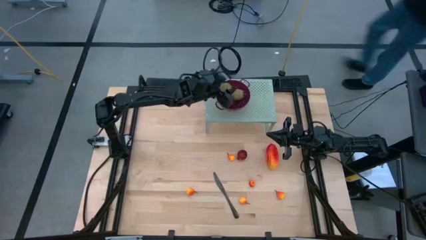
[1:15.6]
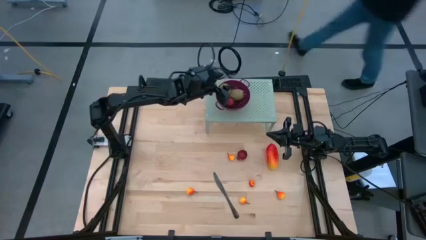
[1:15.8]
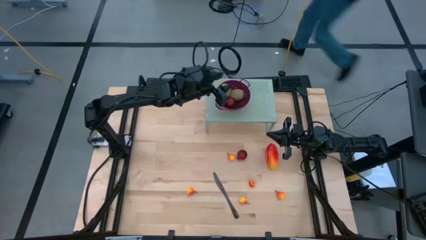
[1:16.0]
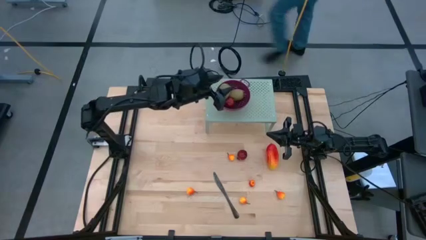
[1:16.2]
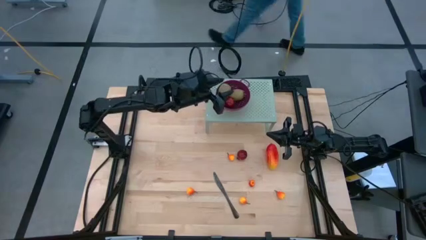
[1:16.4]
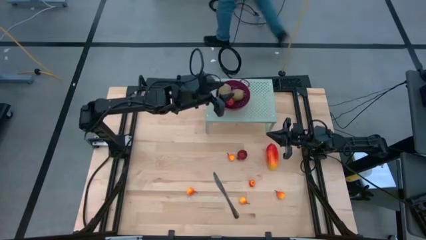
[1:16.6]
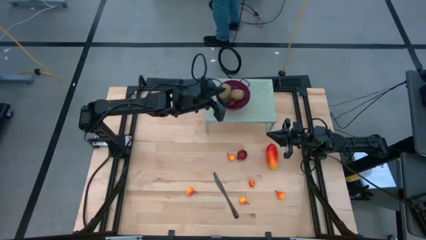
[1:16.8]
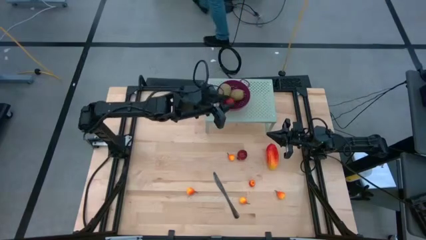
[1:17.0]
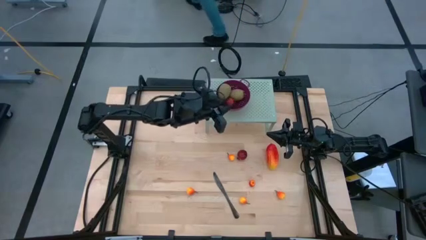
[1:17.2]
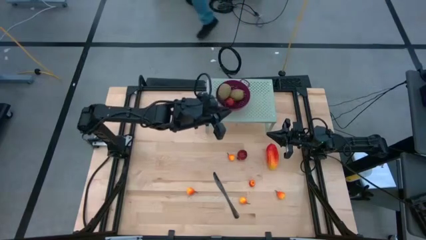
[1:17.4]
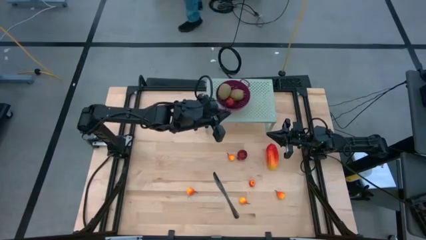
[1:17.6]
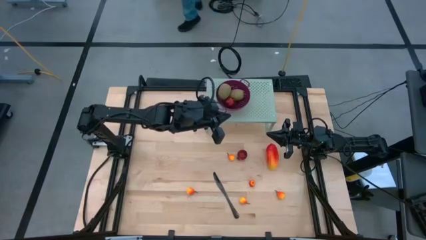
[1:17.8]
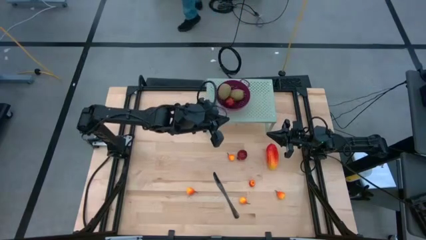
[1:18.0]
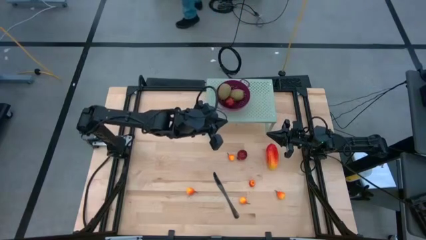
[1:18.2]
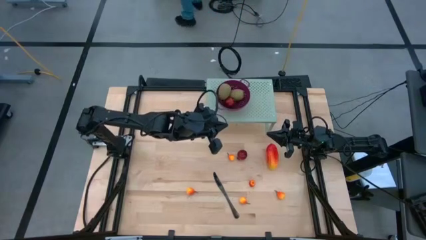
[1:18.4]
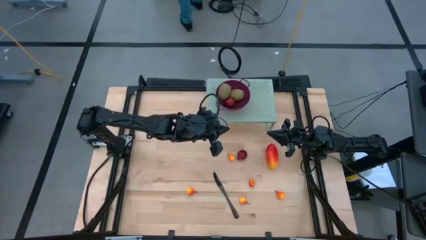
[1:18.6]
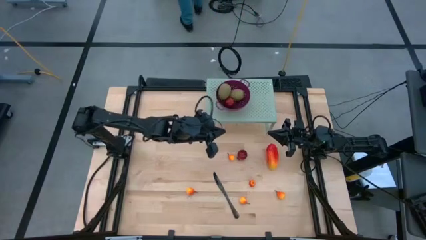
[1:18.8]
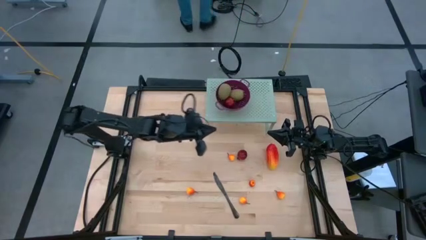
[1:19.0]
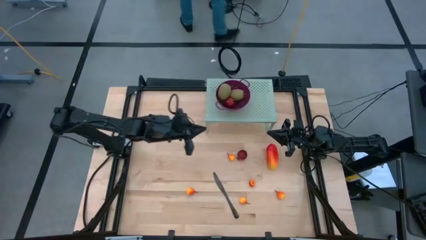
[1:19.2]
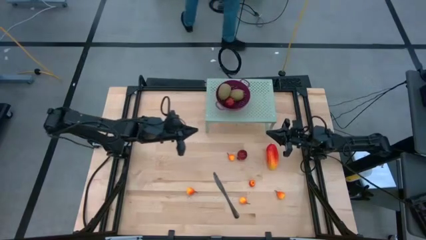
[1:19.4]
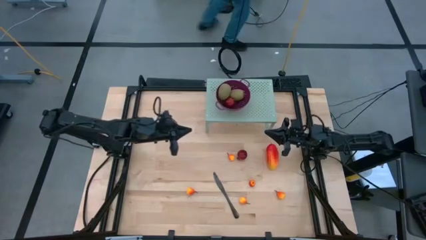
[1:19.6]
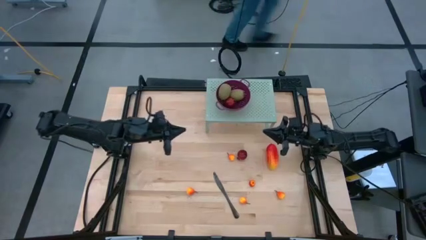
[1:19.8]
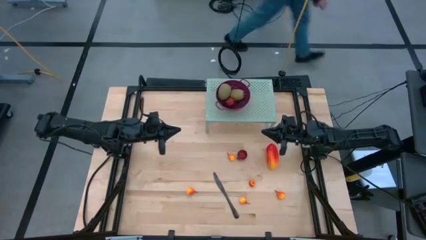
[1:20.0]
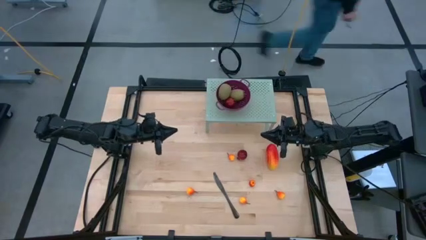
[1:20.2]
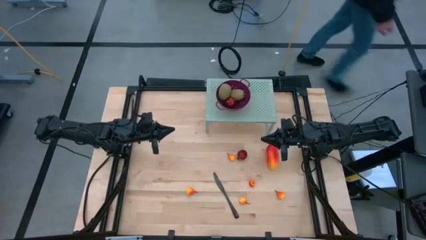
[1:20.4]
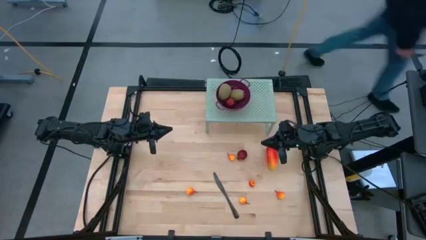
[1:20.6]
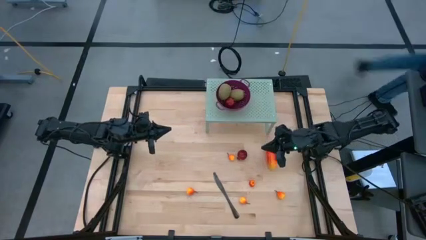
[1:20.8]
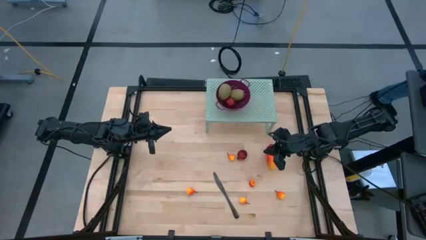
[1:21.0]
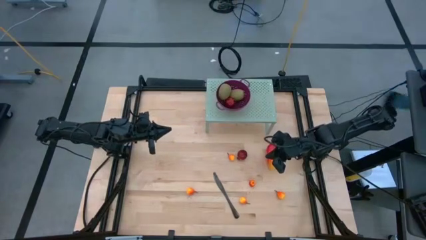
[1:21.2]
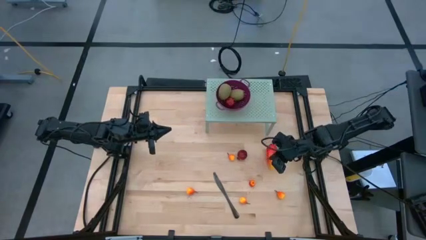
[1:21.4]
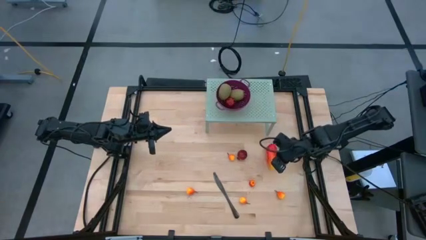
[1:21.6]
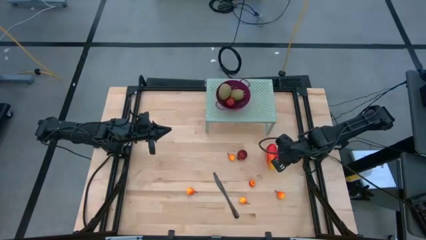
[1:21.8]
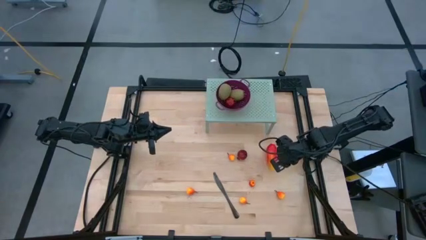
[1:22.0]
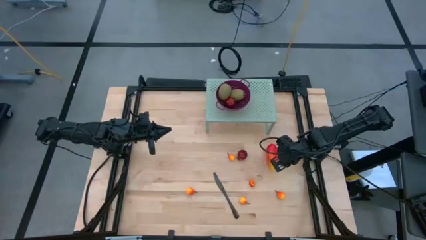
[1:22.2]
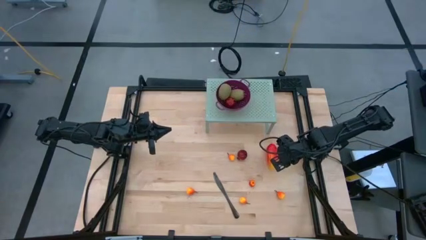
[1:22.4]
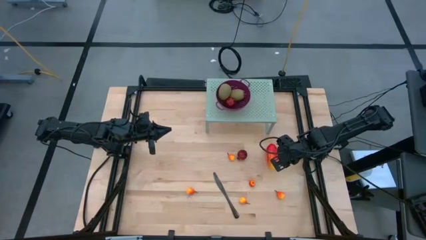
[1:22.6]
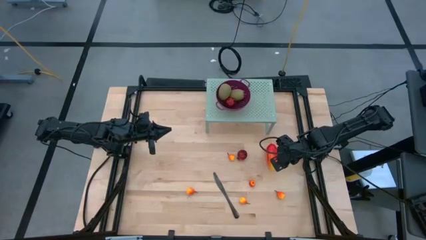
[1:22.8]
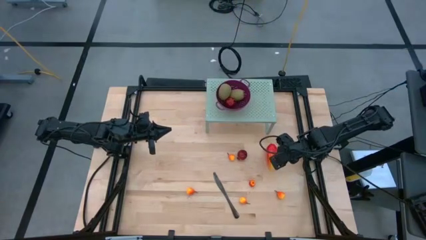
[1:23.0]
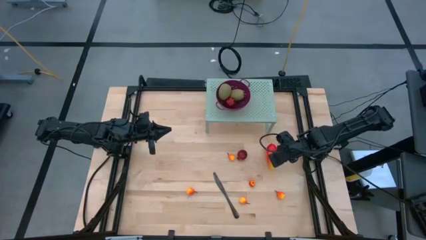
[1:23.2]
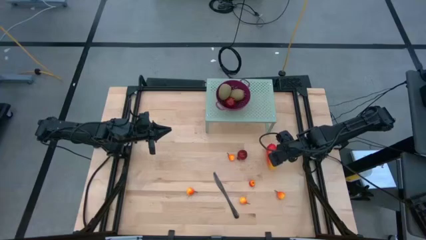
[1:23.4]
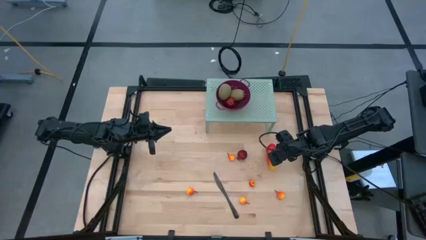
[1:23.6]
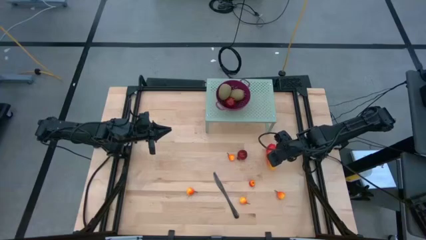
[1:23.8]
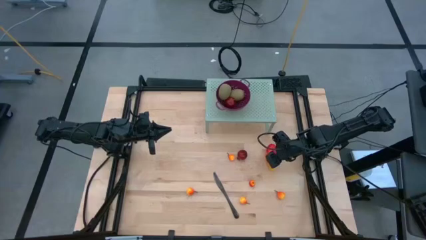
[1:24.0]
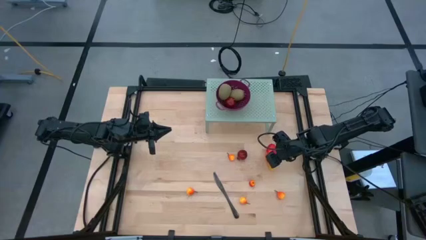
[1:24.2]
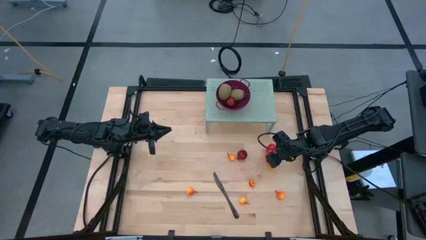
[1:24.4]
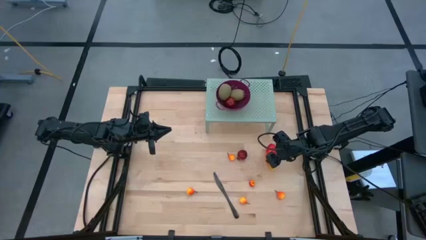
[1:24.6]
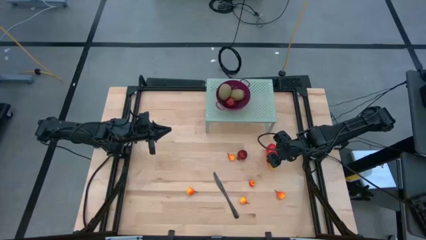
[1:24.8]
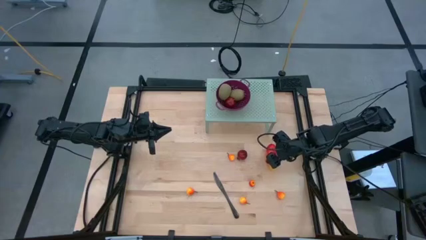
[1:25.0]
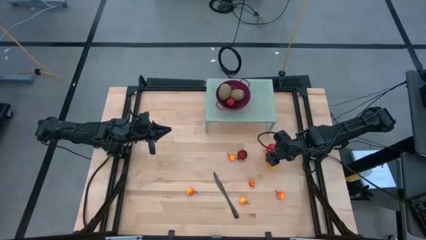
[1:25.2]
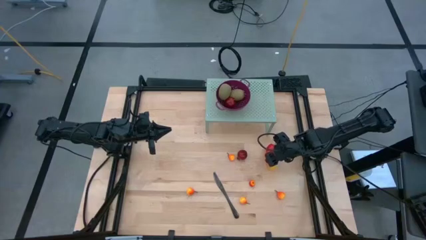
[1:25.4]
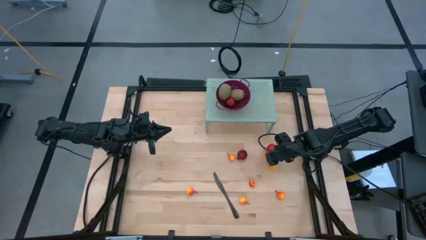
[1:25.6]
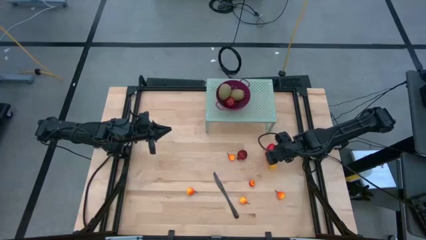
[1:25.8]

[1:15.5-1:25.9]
Task: Pick & Place Fruit
Put the red mango into the violet strainer bowl on the shelf

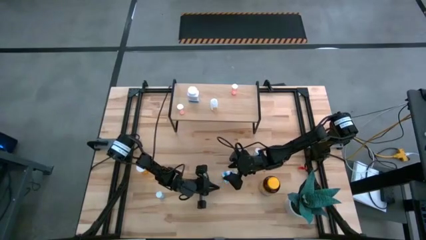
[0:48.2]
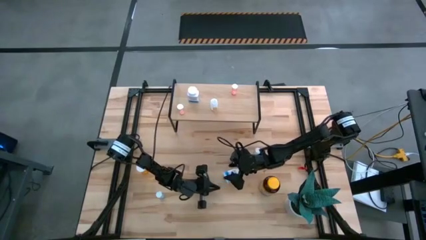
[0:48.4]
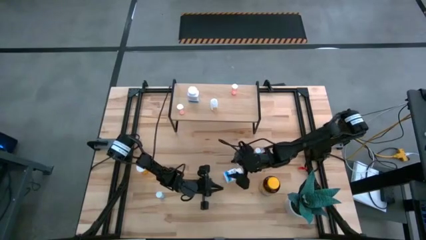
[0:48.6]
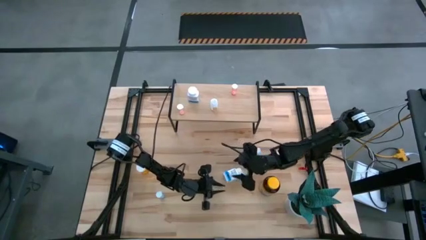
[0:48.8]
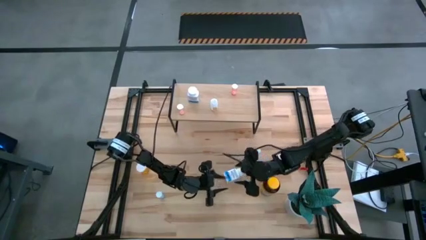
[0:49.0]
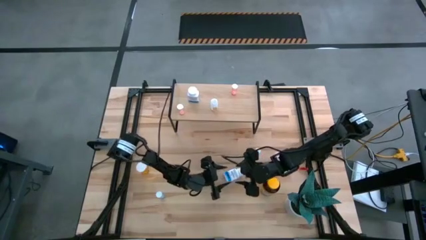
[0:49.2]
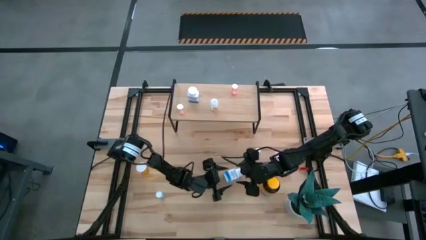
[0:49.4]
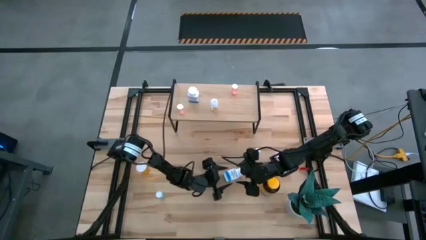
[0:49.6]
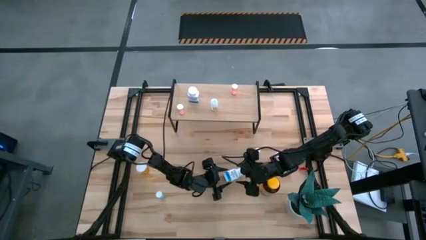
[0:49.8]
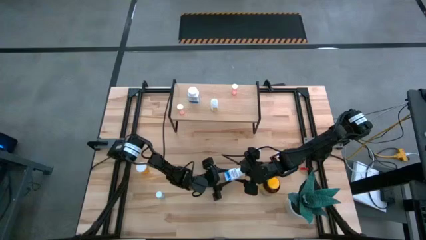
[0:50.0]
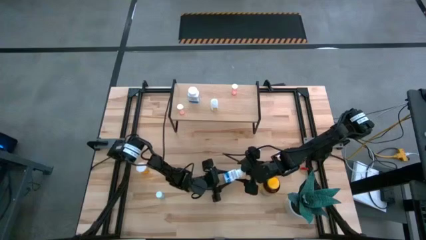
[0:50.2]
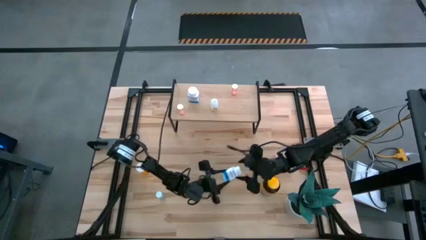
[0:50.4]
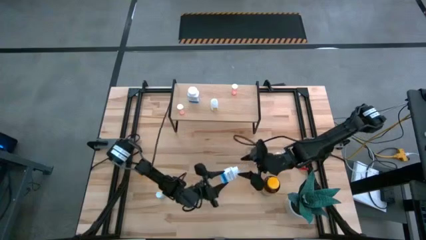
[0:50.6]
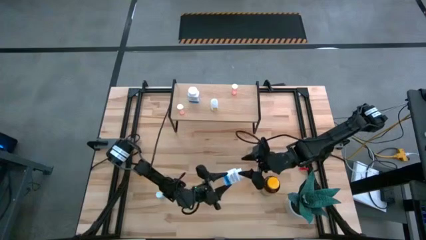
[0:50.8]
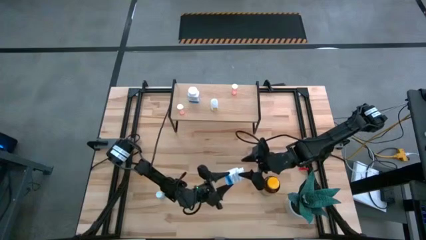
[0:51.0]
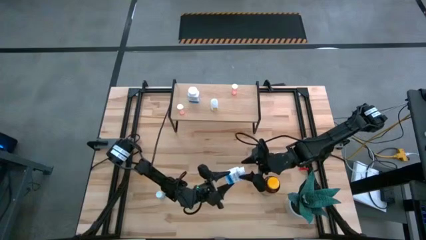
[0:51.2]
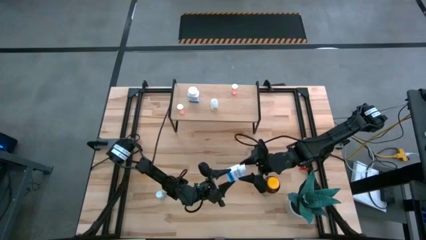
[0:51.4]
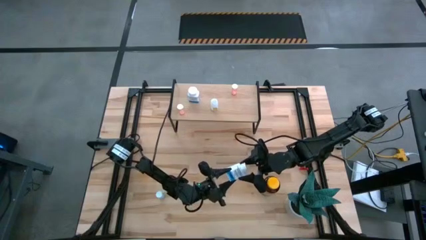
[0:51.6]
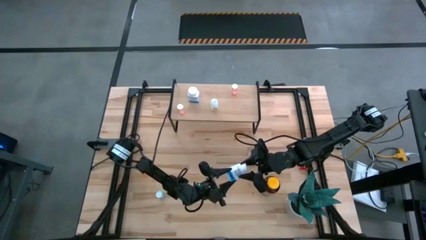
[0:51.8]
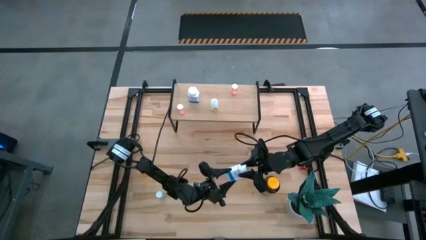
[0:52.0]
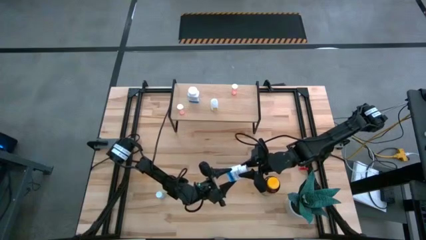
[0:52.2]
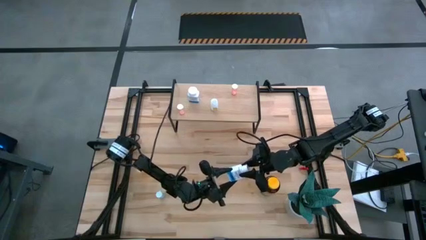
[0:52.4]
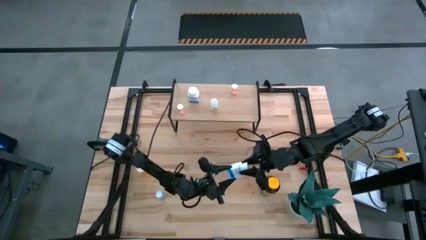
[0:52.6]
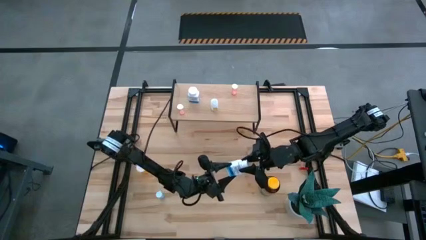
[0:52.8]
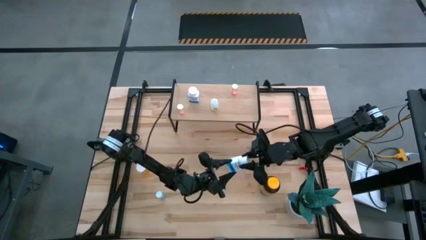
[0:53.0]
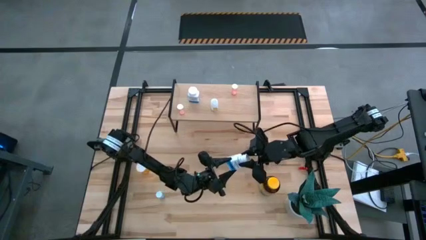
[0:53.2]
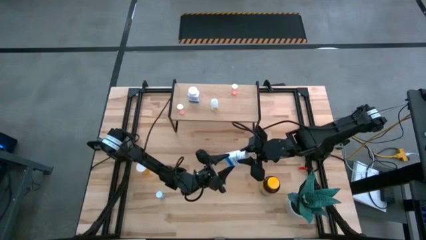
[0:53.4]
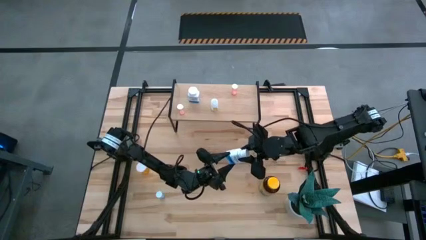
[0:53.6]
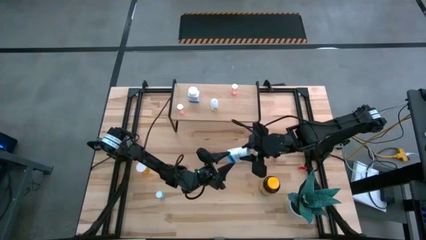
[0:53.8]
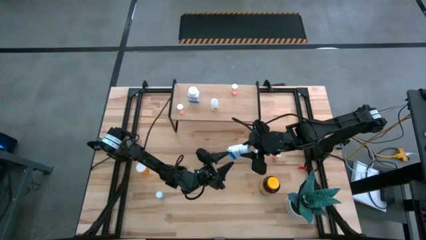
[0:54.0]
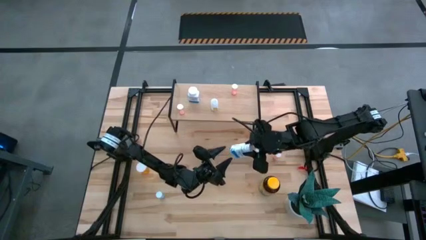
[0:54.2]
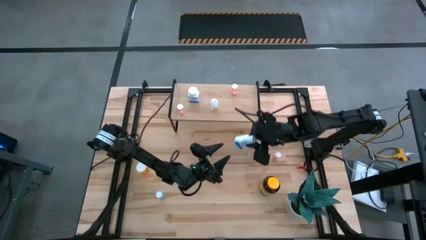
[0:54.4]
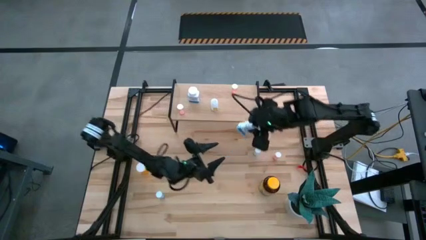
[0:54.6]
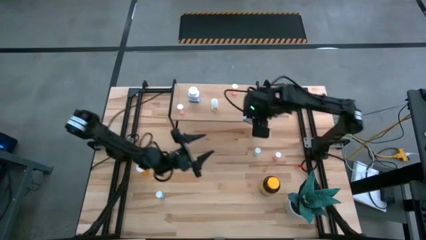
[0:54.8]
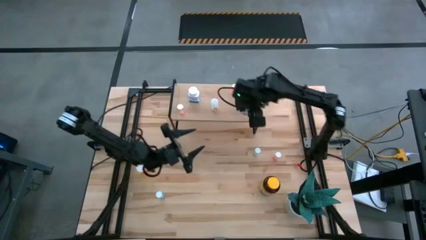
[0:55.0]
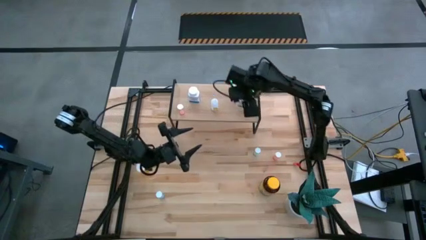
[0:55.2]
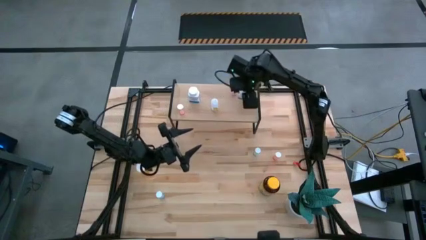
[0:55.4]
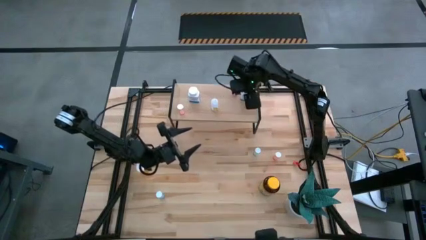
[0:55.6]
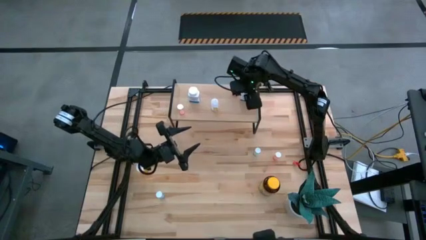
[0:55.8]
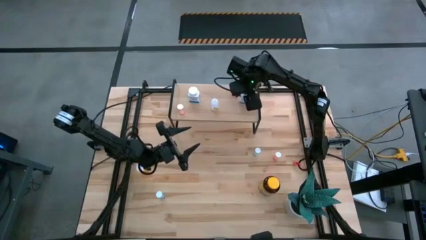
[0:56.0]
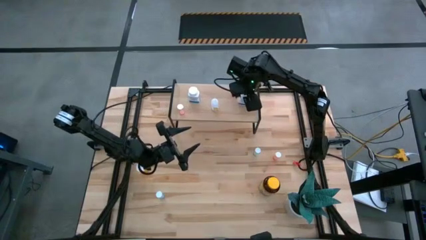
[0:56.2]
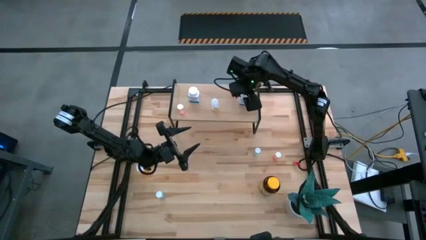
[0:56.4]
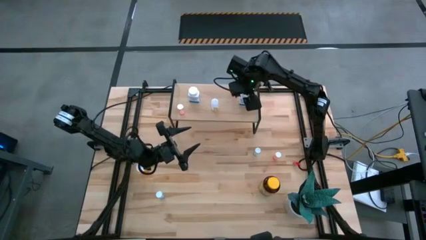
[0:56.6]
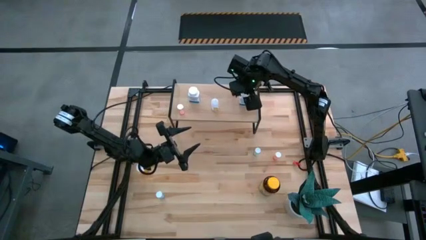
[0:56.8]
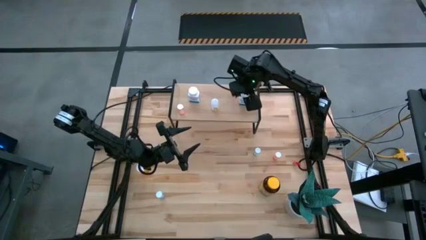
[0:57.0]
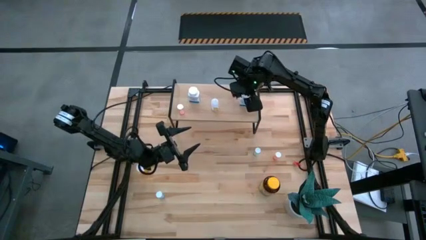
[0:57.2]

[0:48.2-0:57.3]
Task: Pick and place medicine bottles onto shelf by color
Put the white and blue blue pill bottle on the shelf
